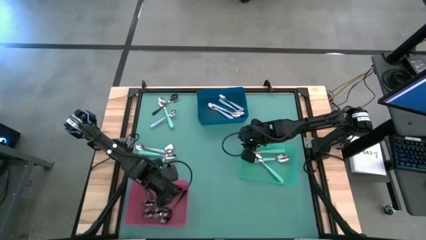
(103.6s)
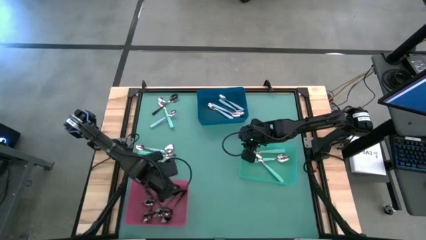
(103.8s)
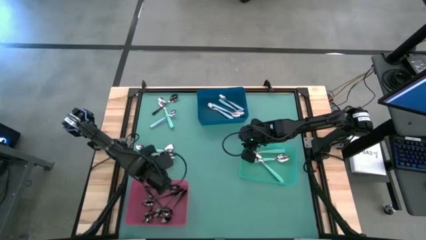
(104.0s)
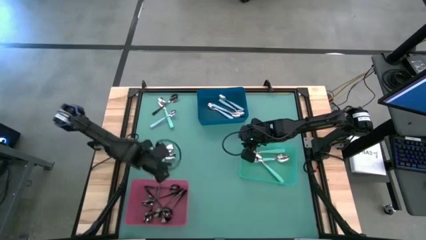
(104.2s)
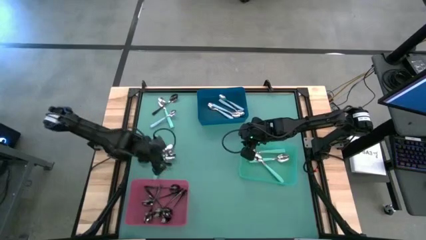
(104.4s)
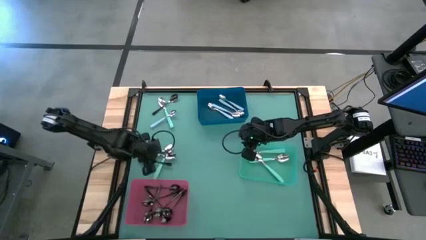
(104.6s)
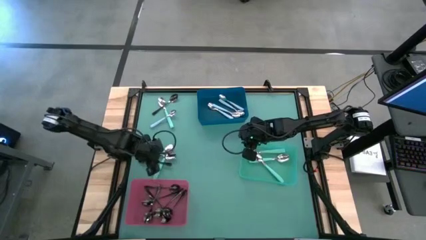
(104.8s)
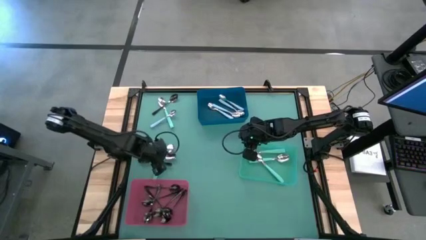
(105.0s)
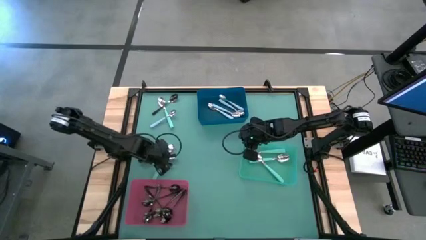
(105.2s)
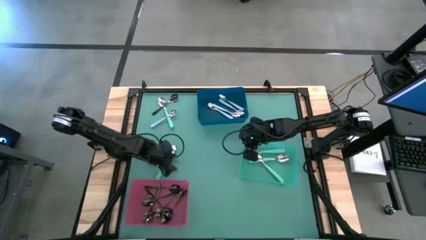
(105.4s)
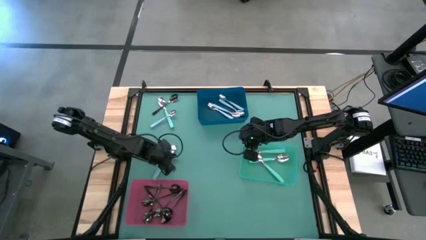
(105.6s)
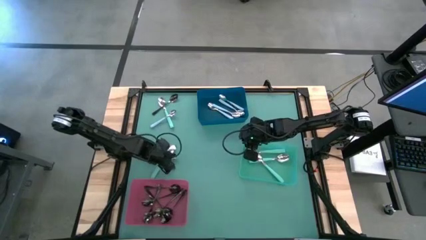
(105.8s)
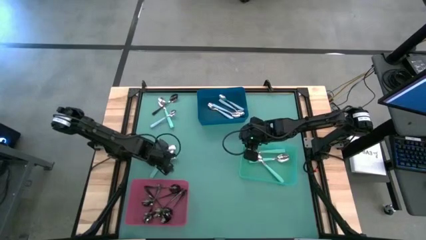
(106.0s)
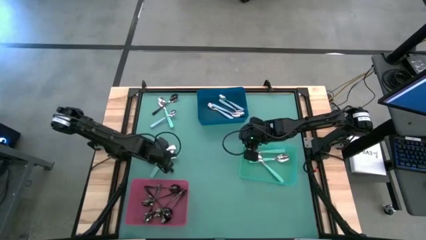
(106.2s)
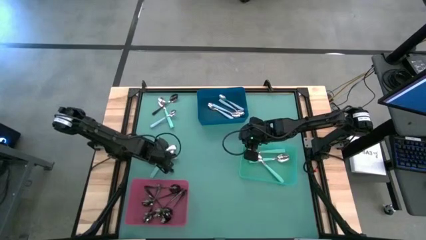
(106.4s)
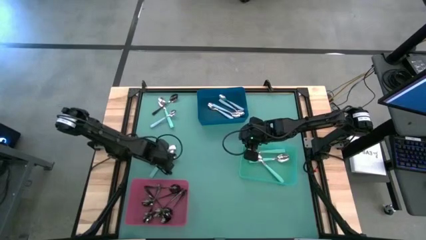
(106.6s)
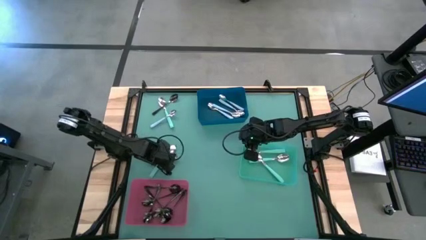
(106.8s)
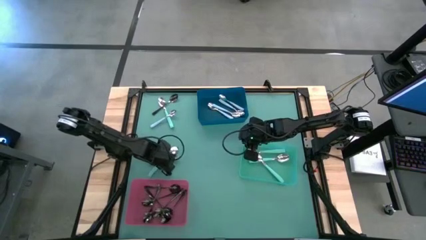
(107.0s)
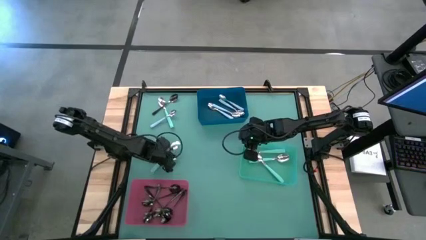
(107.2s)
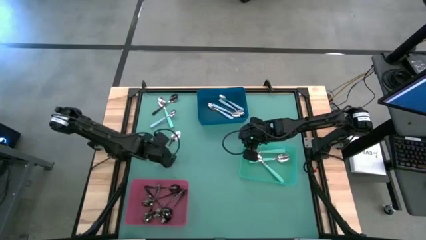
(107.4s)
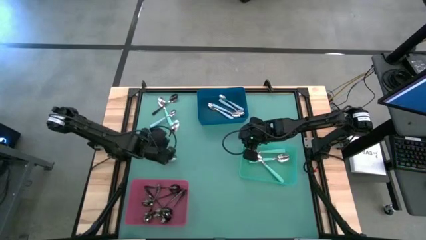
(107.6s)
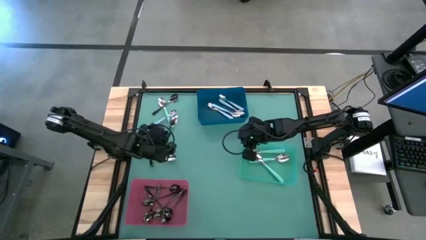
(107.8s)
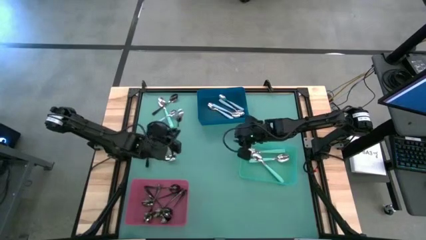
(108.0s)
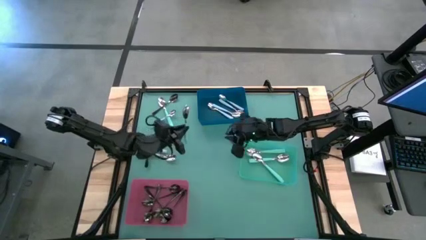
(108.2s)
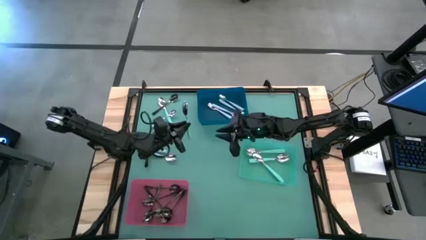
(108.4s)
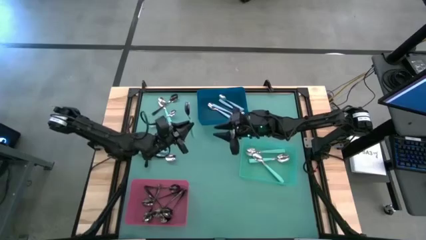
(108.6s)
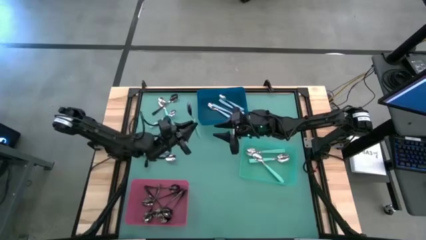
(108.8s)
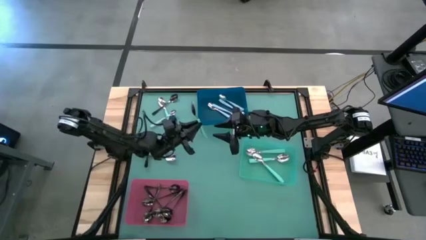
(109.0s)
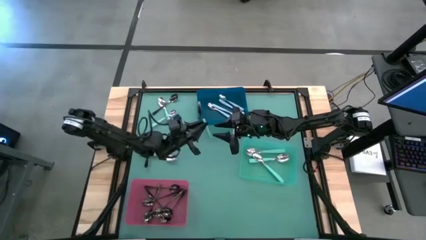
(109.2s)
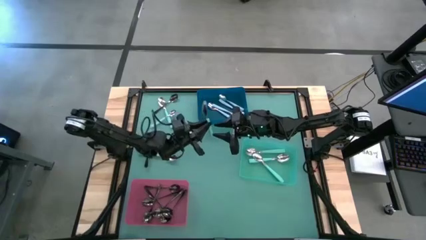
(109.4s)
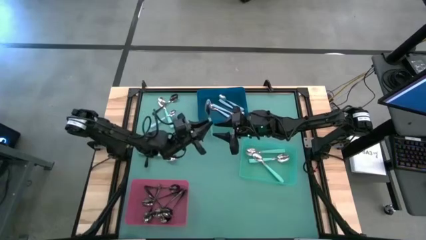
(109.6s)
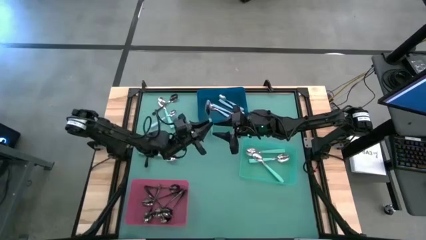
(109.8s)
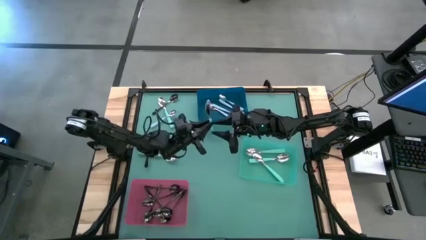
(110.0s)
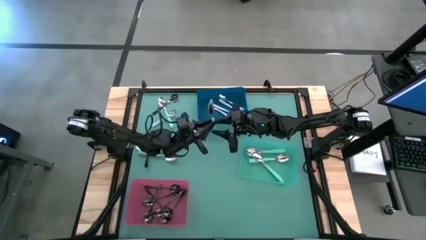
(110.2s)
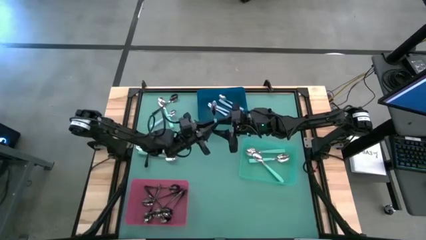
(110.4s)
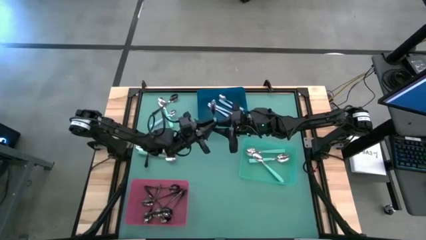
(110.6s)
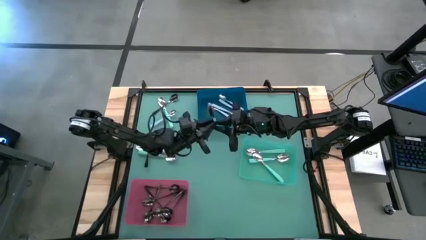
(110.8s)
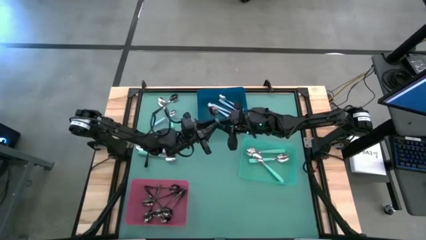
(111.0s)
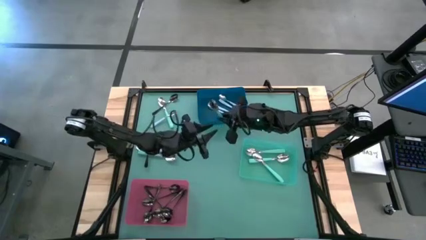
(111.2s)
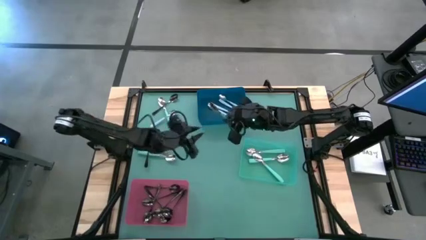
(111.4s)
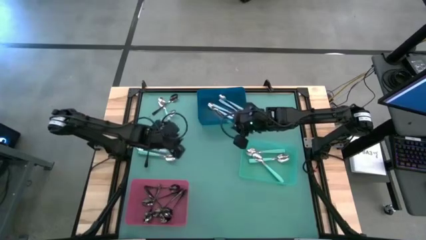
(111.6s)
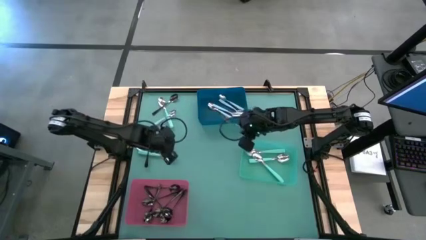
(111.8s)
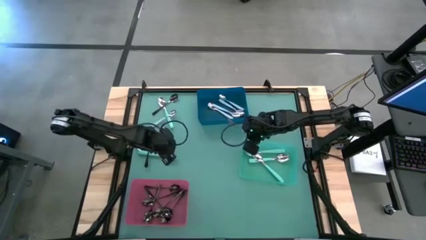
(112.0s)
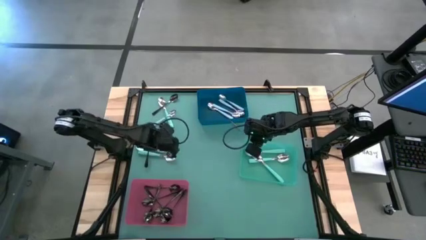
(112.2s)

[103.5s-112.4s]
Task: Sort silverware by color (type)
Put the green spoon into the green bin

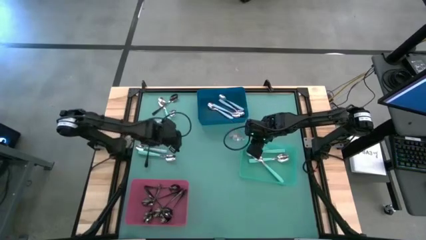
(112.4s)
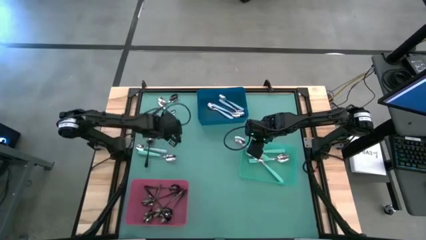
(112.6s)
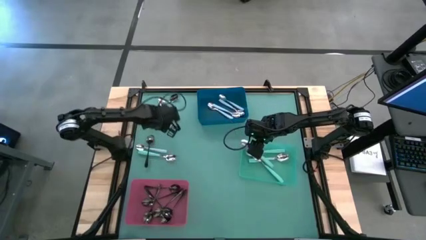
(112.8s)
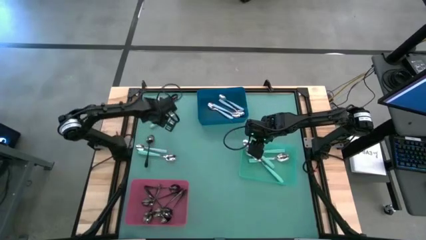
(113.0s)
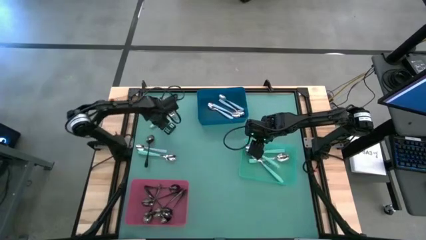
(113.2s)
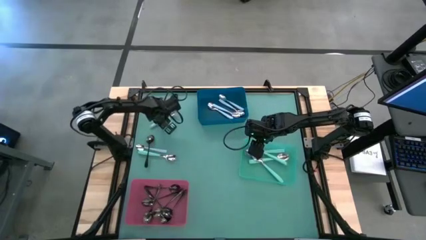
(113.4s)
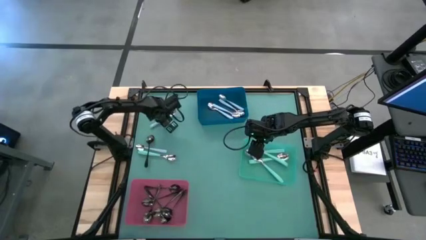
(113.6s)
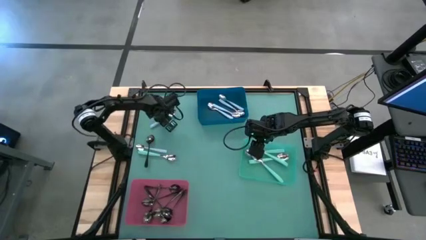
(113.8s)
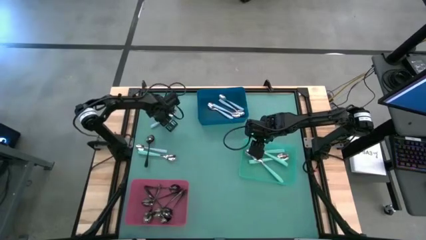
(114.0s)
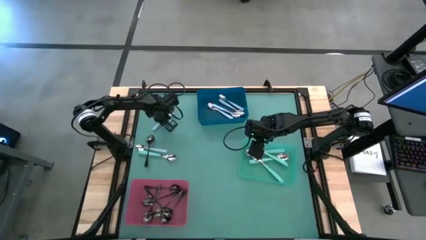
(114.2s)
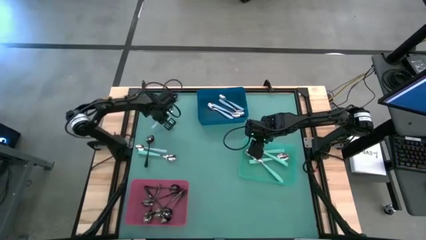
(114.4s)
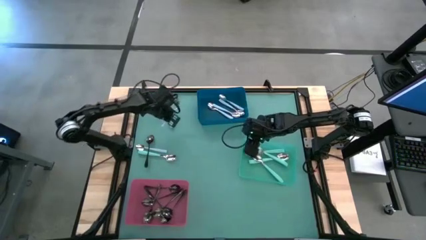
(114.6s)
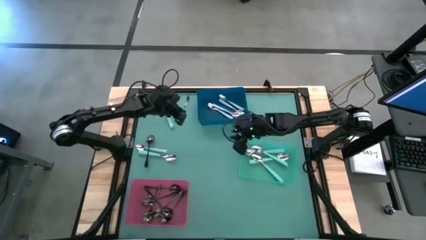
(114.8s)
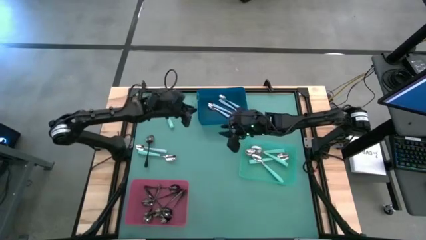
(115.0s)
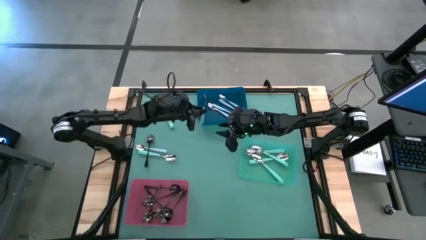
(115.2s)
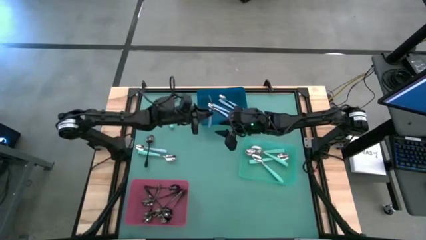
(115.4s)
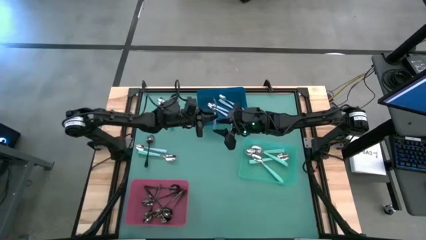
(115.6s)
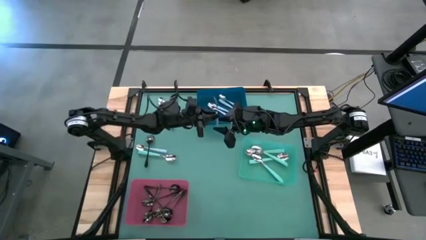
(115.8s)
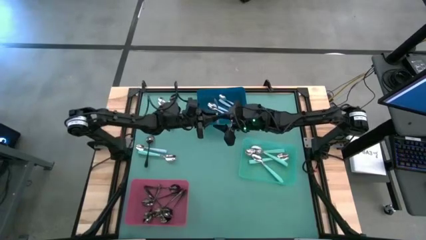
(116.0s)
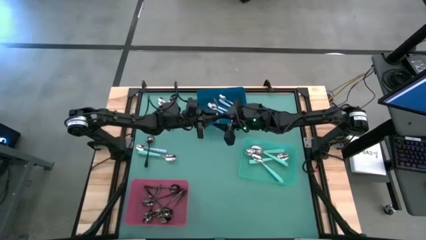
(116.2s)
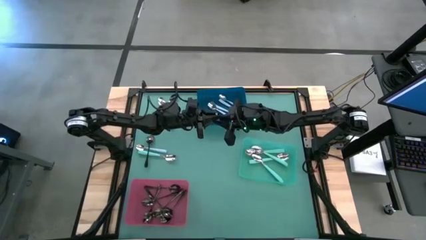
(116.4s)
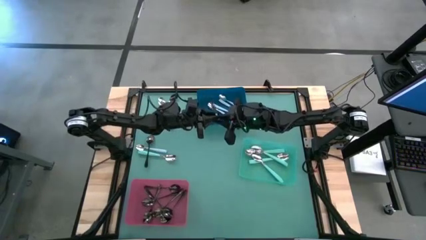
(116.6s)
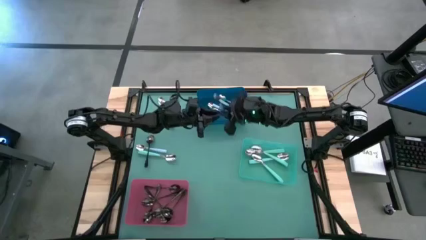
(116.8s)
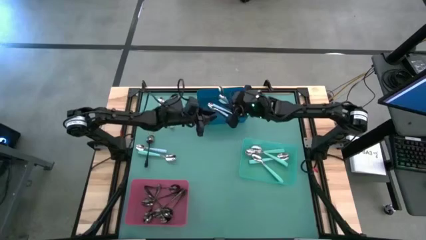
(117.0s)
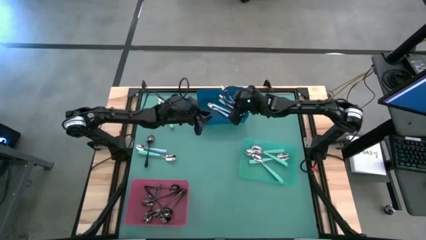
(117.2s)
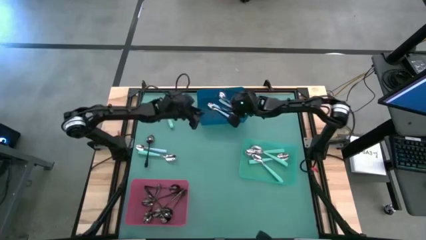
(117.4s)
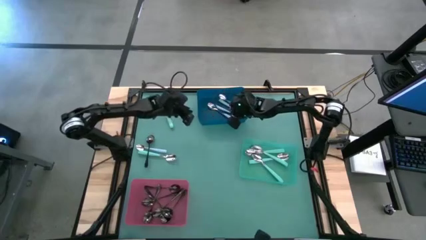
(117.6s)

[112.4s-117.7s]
Put the blue spoon into the blue bin

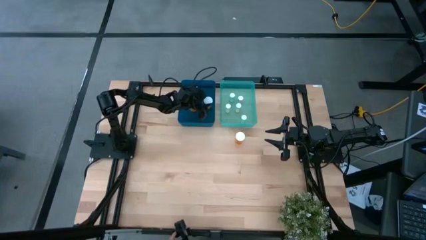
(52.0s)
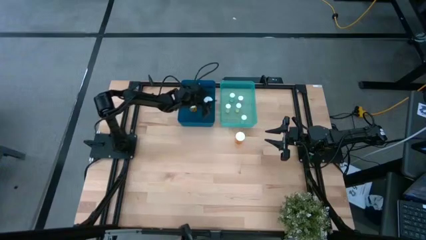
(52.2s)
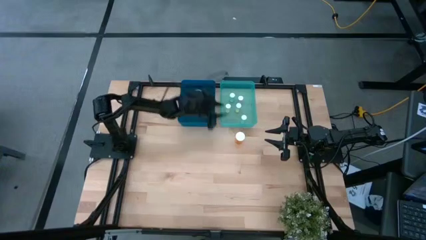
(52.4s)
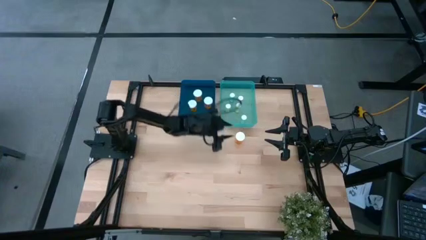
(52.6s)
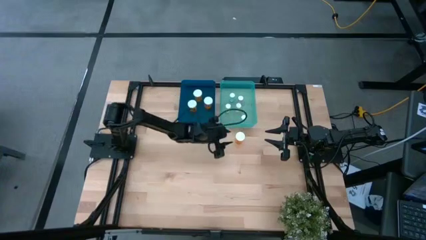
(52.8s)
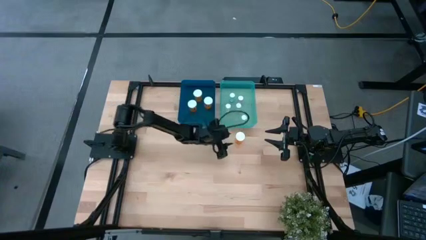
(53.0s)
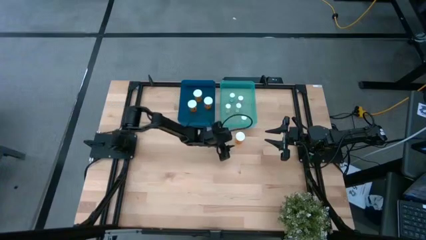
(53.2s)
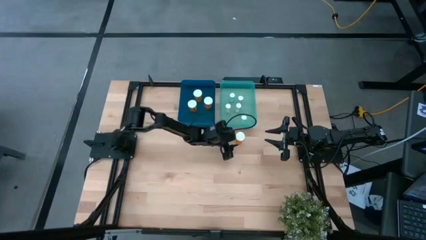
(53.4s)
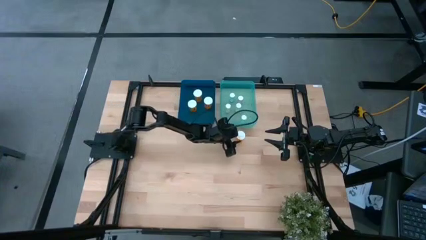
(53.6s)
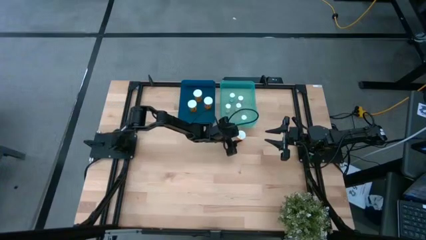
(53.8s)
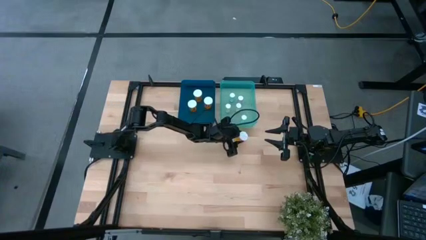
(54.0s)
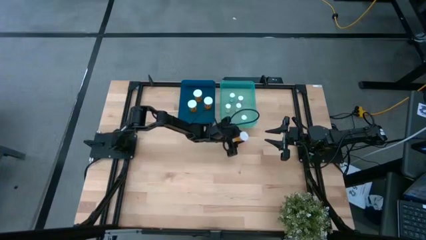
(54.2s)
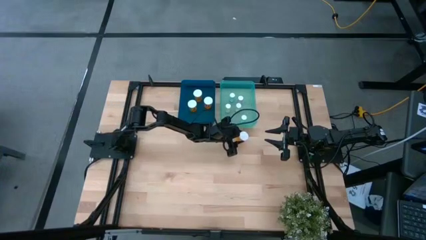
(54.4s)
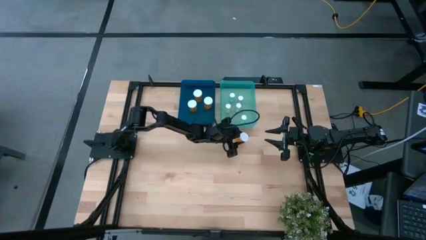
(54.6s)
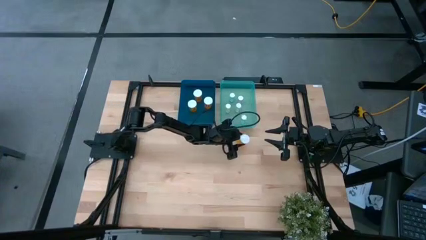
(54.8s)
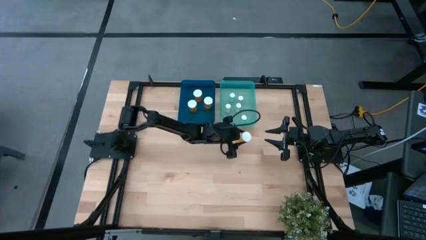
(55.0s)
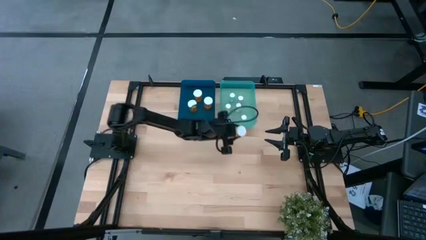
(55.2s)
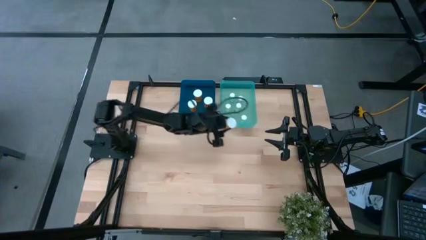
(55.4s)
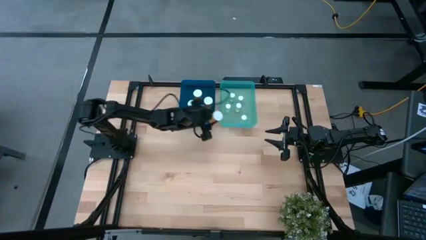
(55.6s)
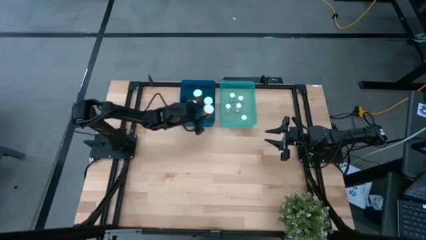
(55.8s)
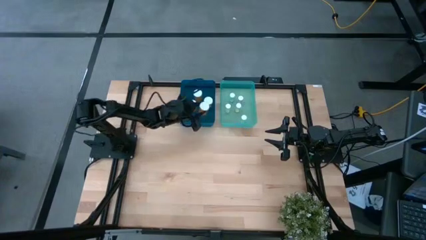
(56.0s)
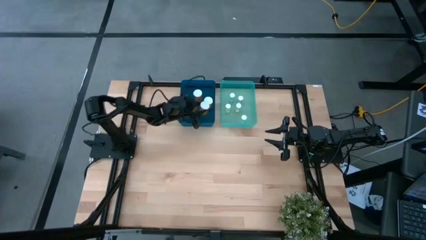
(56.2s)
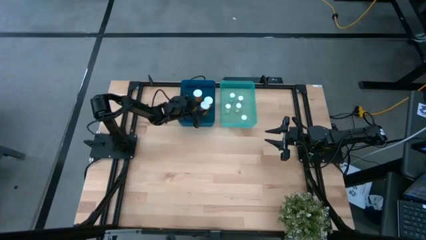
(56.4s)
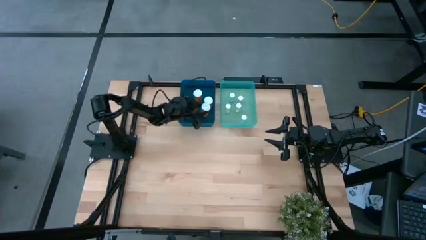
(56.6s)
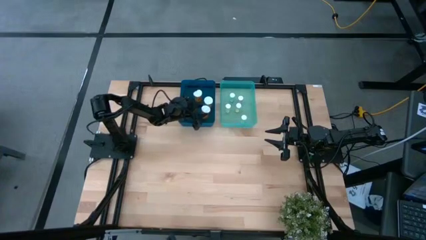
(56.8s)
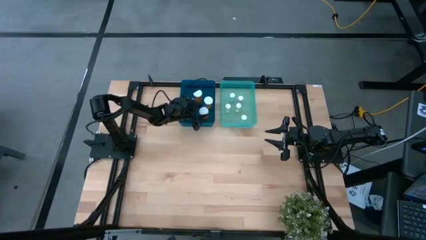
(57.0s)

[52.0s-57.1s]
Task: Pick and place medicine bottles into bin by pill shape (circle, oval)
Put the orange capsule bottle into the blue bin
